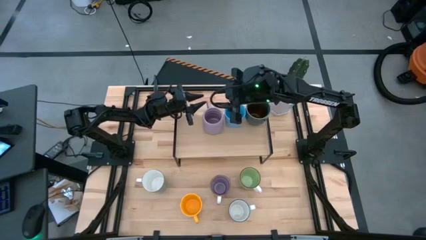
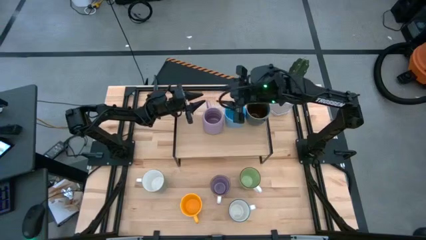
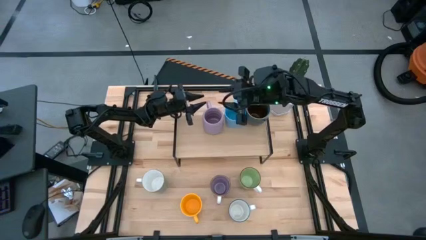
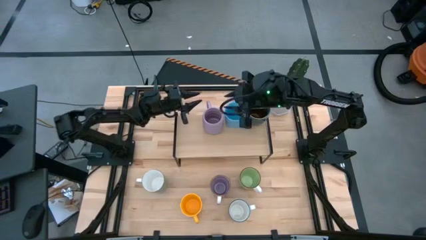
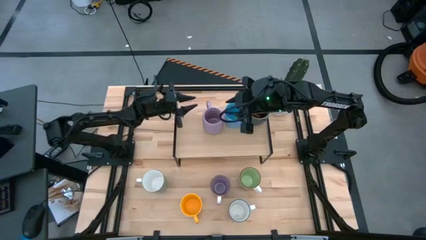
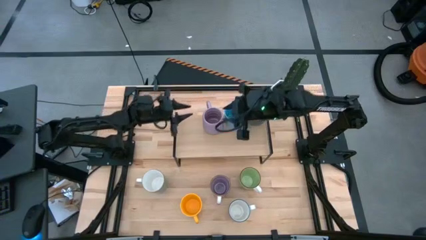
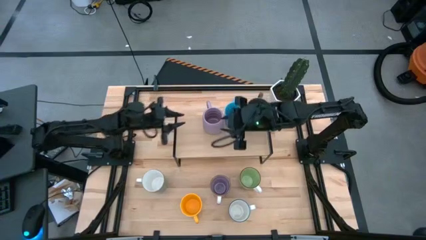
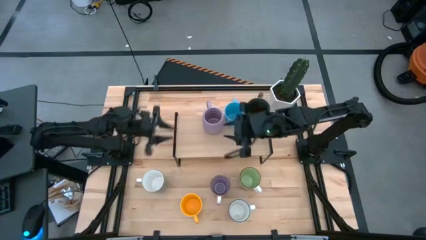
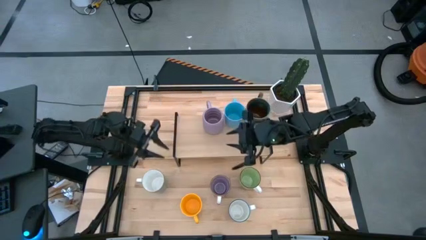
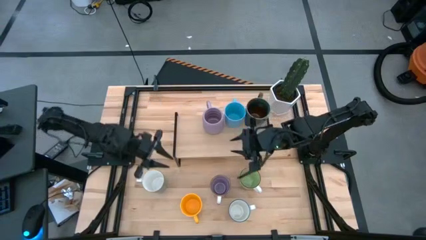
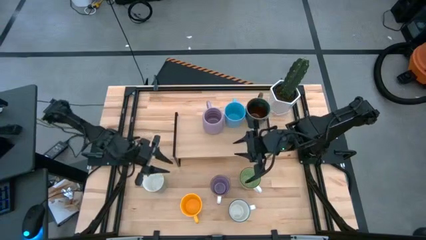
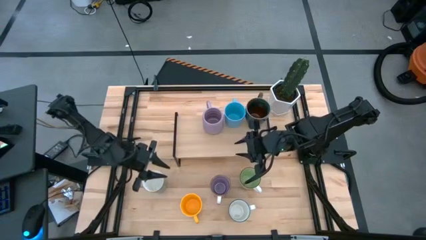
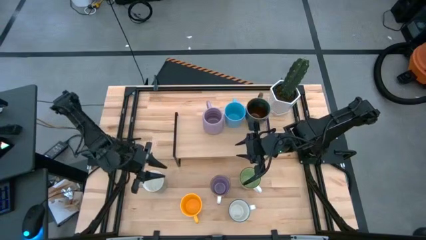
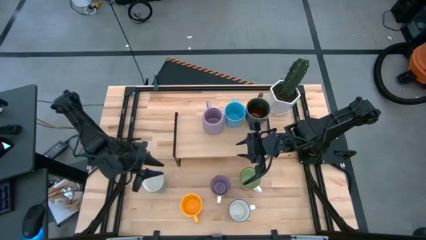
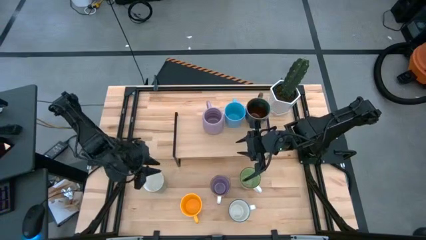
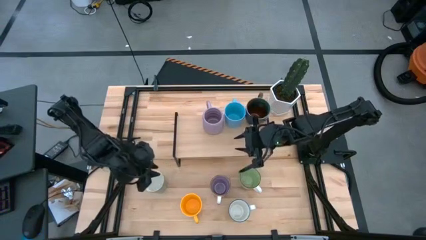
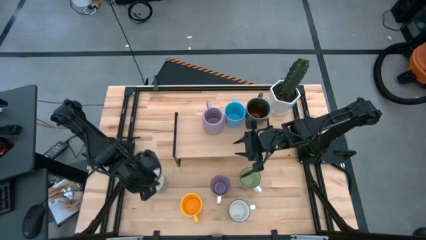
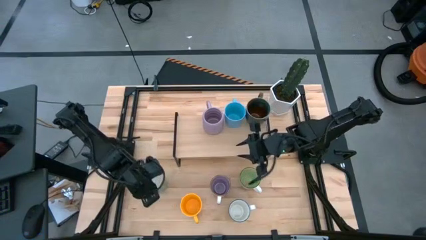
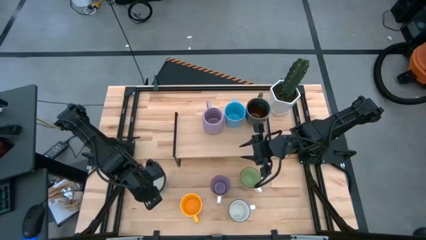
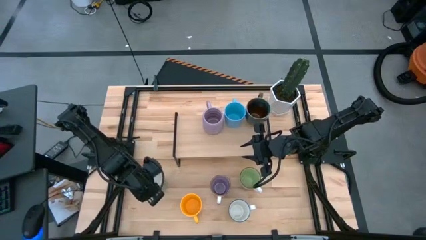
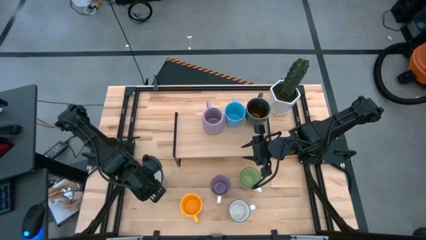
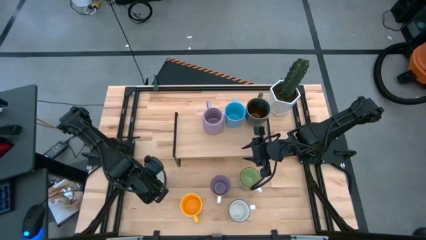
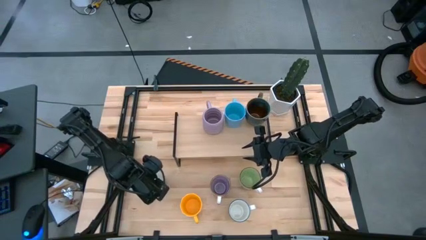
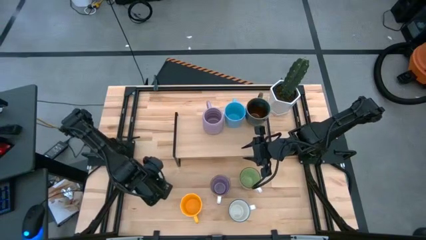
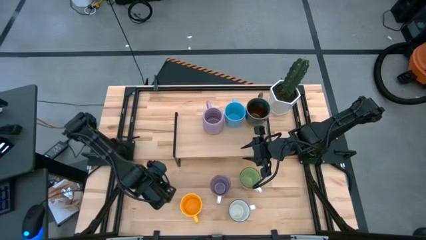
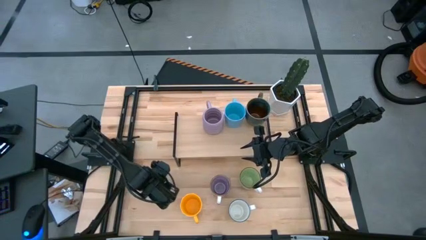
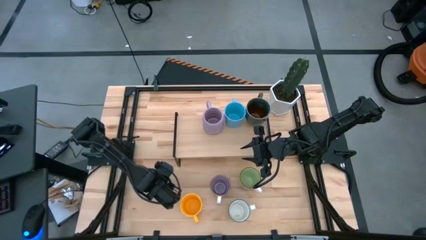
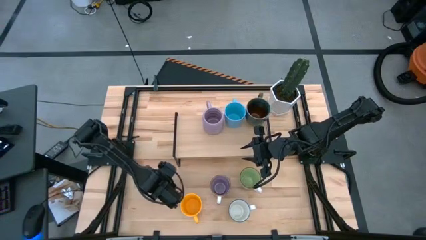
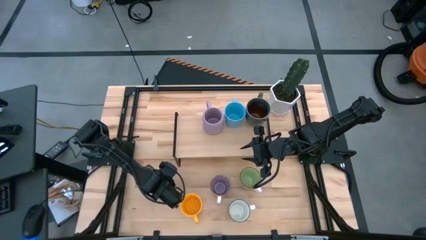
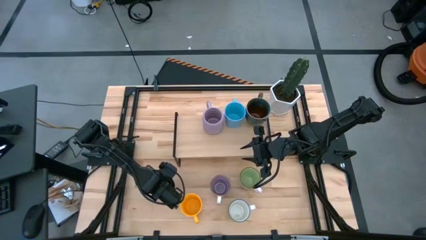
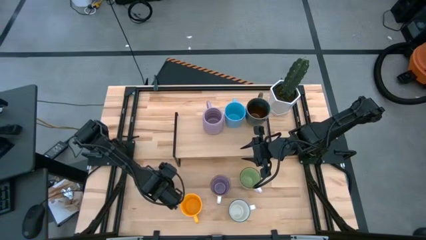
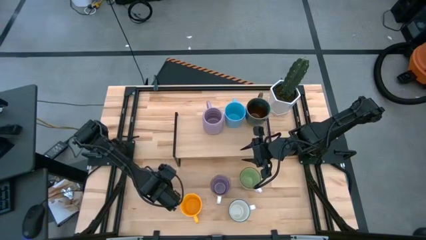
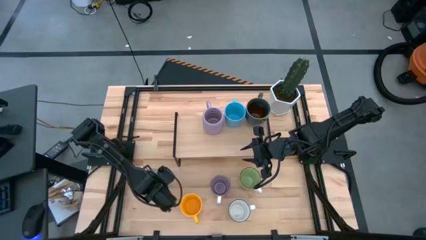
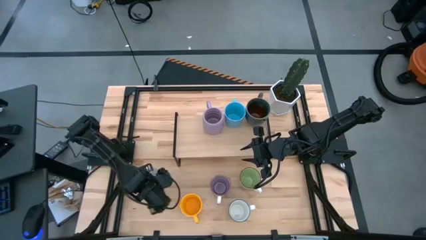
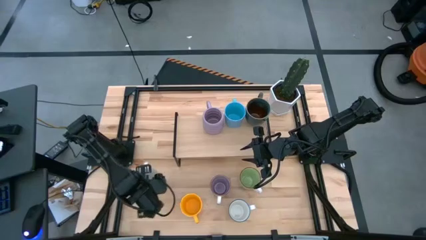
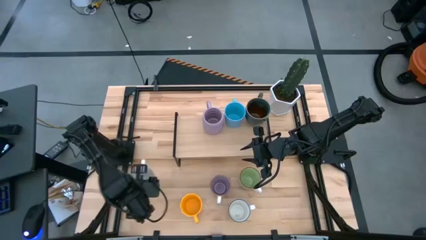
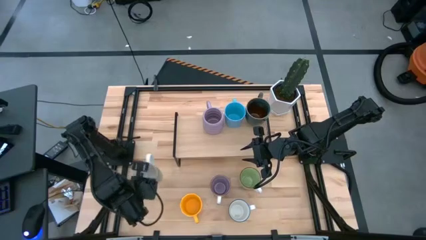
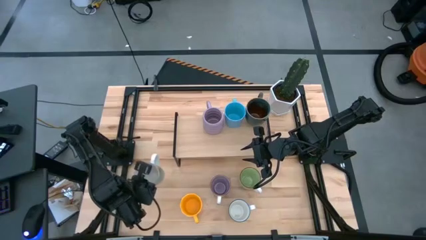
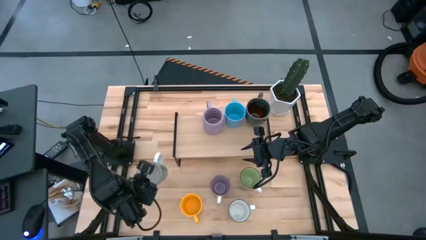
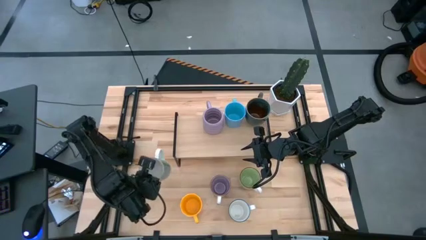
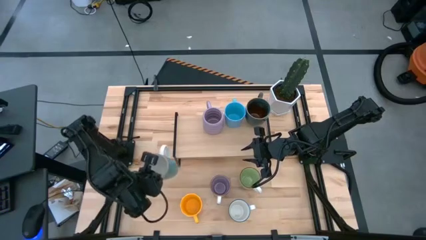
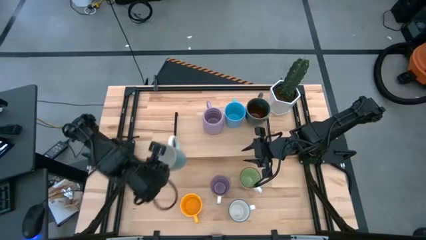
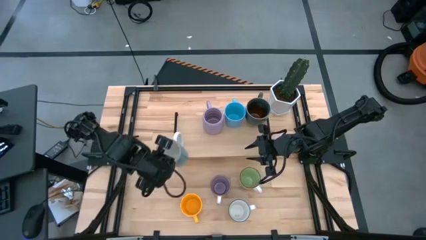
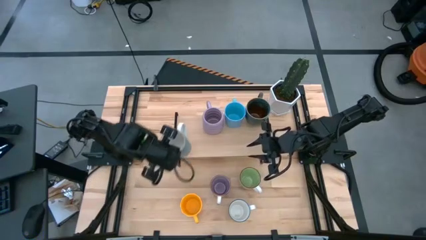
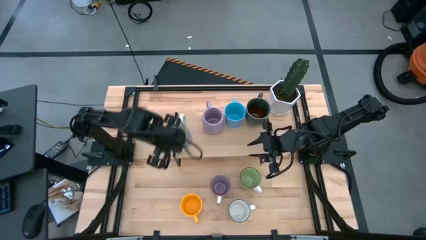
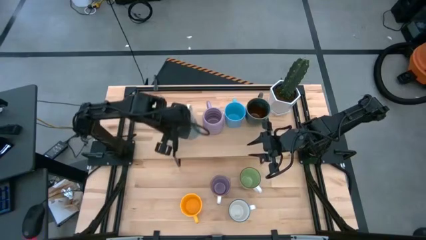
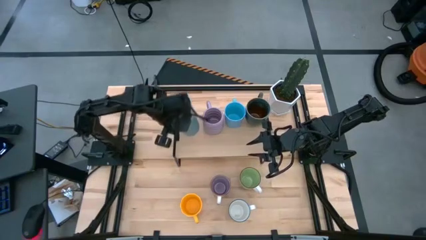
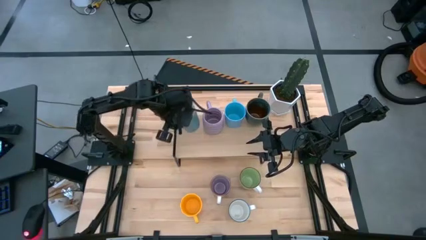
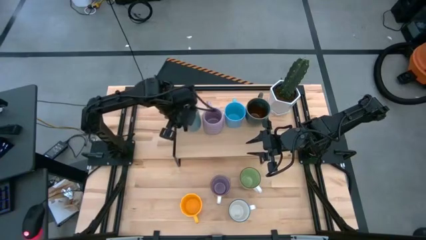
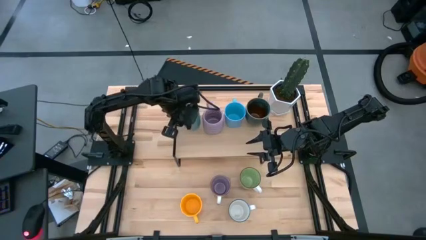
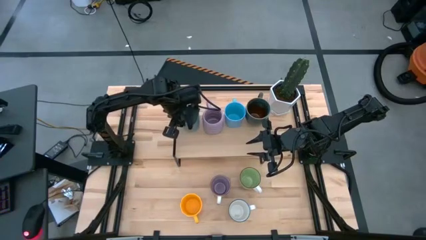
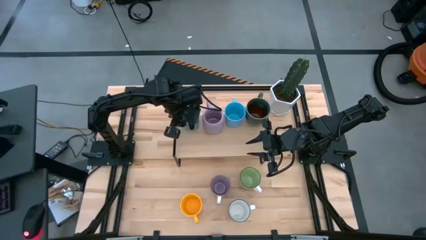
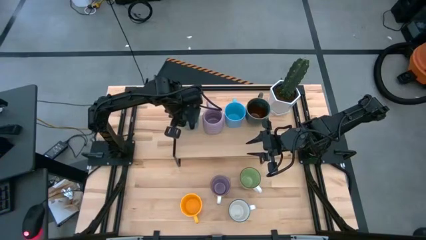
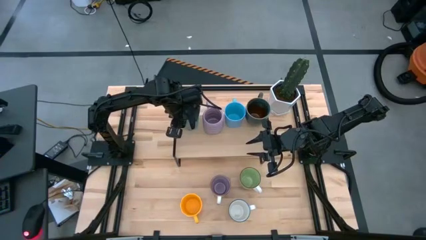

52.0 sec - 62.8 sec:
Task: Place coffee mugs
Put the left white mug on the shelf
